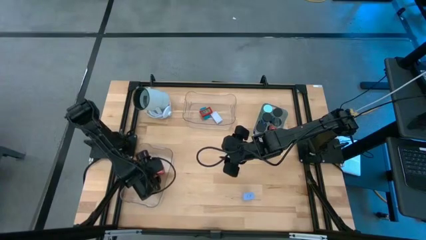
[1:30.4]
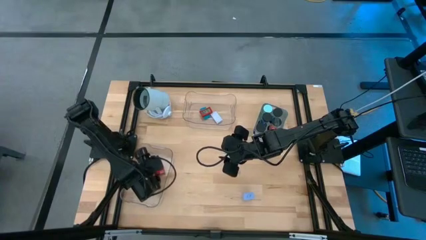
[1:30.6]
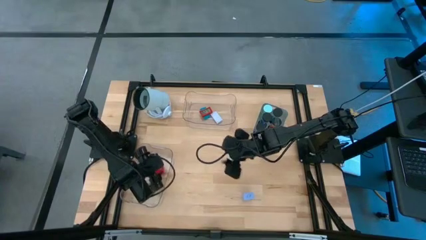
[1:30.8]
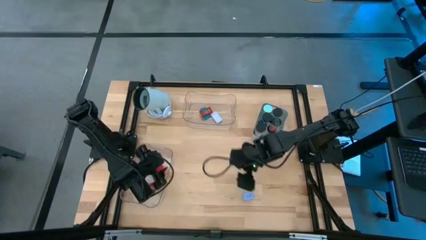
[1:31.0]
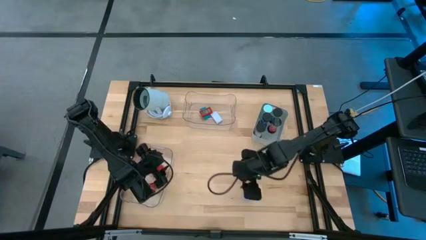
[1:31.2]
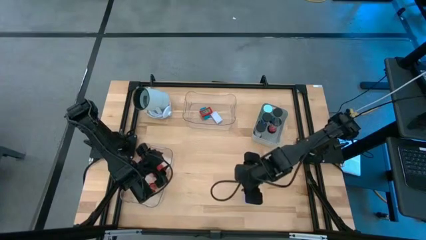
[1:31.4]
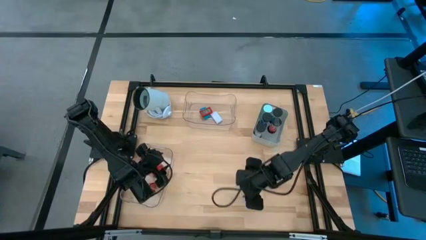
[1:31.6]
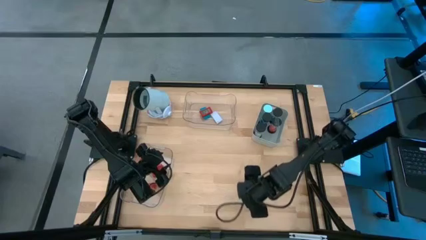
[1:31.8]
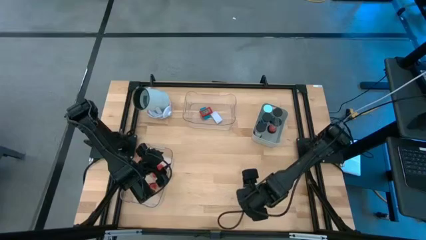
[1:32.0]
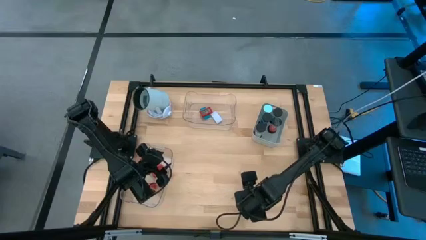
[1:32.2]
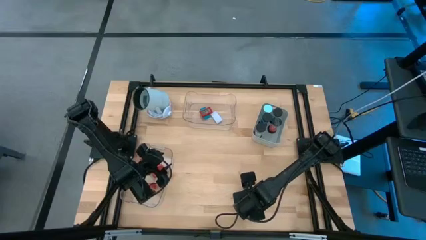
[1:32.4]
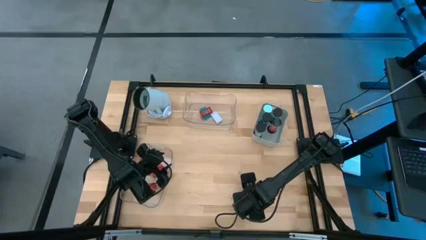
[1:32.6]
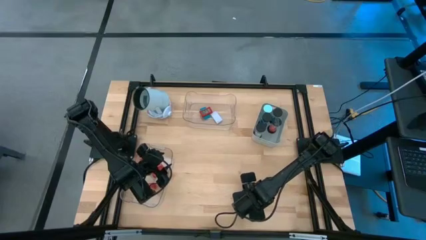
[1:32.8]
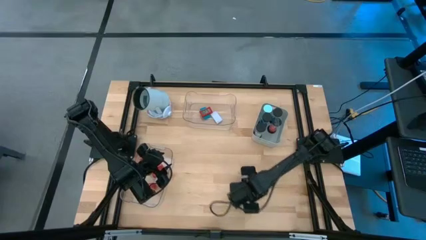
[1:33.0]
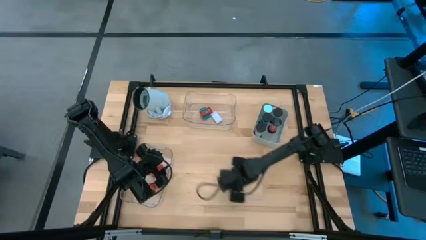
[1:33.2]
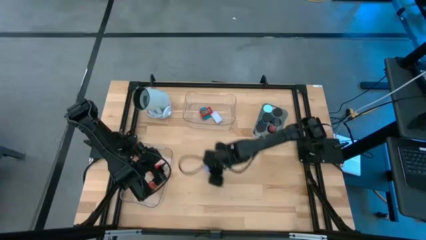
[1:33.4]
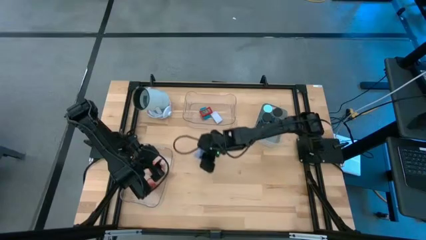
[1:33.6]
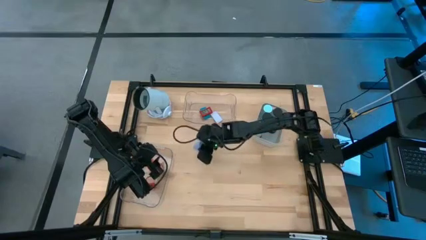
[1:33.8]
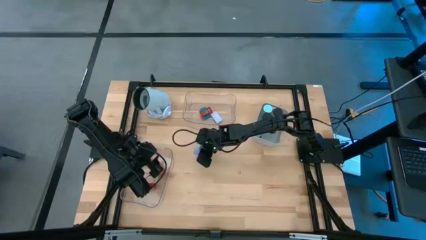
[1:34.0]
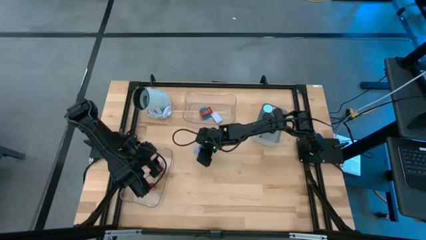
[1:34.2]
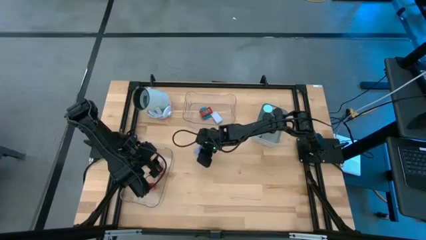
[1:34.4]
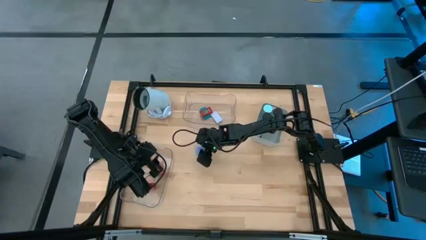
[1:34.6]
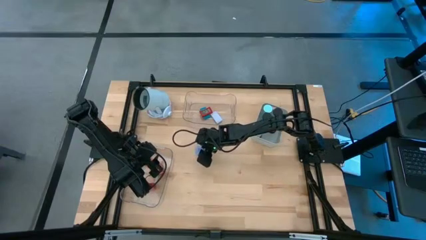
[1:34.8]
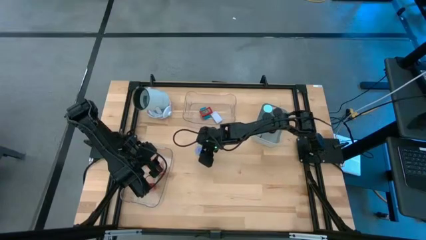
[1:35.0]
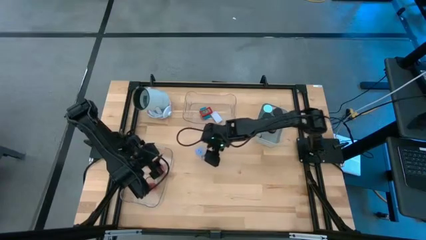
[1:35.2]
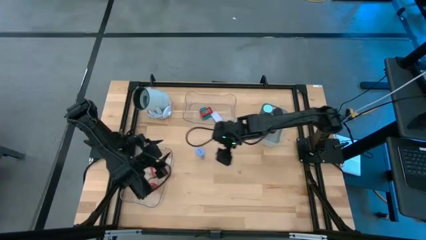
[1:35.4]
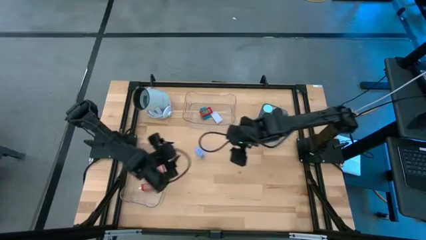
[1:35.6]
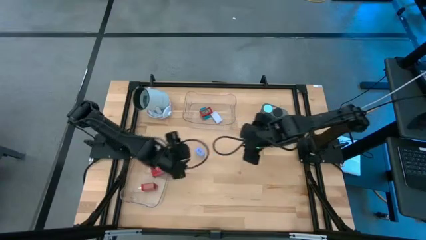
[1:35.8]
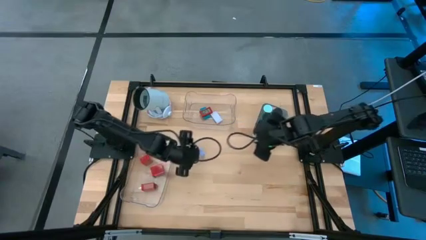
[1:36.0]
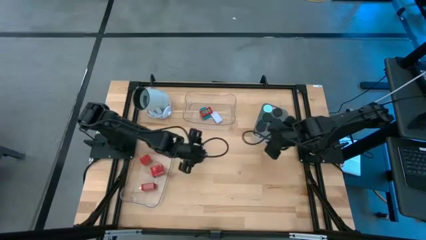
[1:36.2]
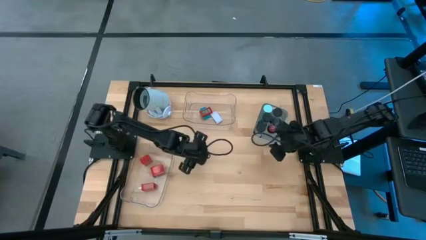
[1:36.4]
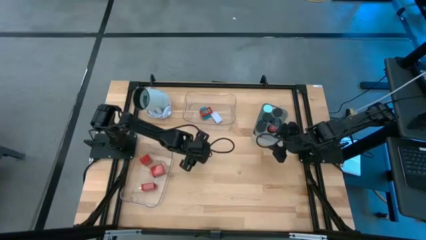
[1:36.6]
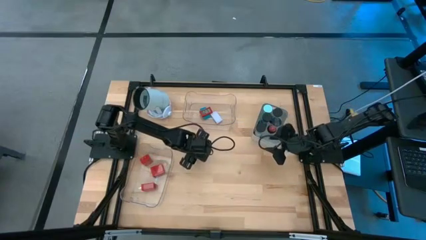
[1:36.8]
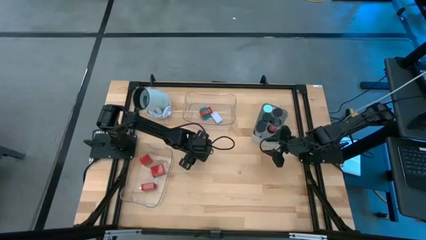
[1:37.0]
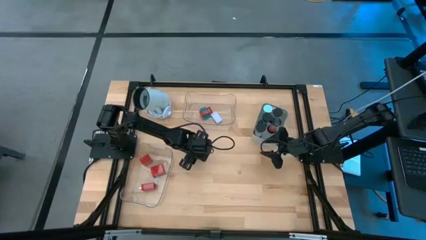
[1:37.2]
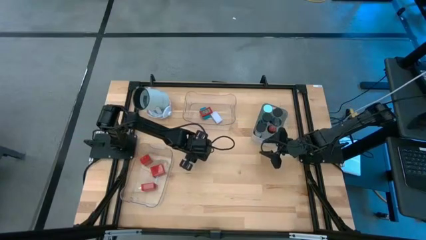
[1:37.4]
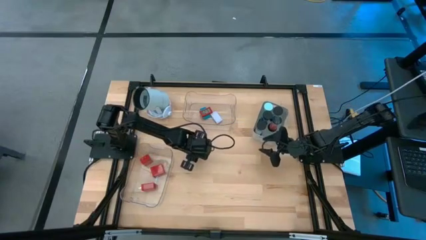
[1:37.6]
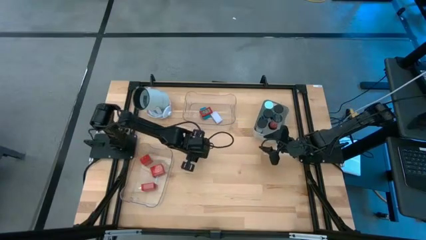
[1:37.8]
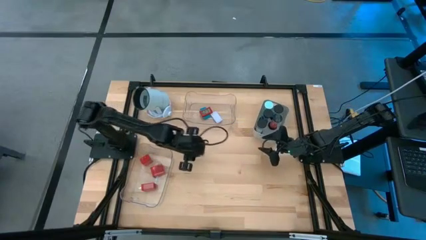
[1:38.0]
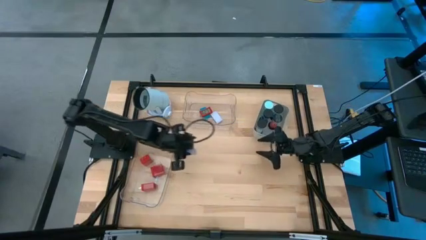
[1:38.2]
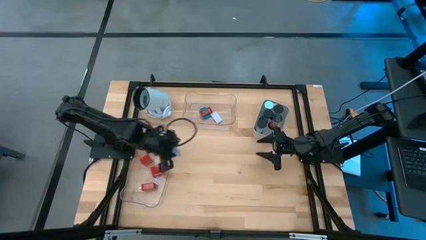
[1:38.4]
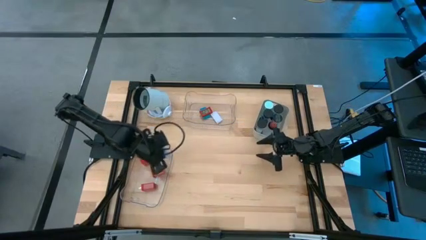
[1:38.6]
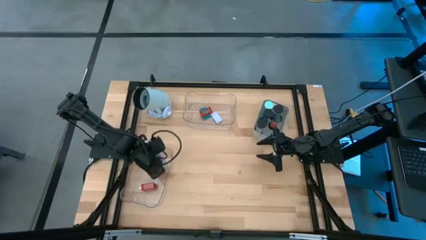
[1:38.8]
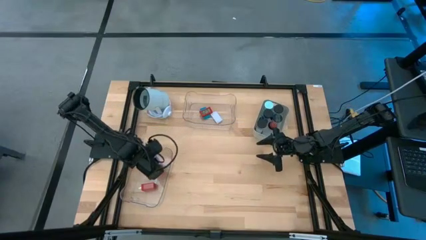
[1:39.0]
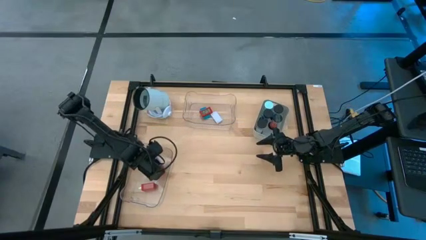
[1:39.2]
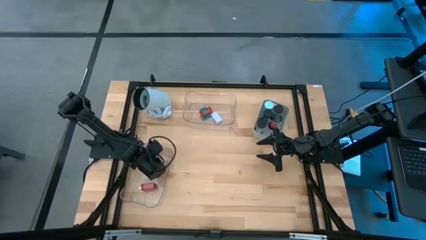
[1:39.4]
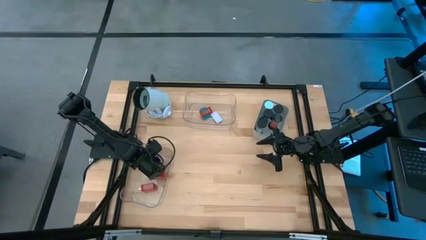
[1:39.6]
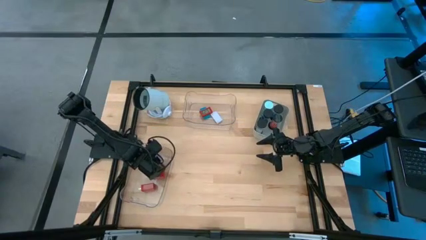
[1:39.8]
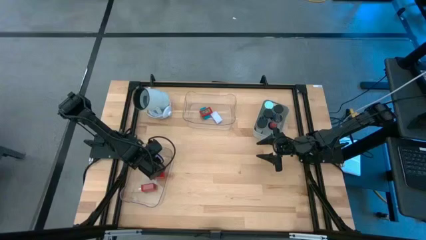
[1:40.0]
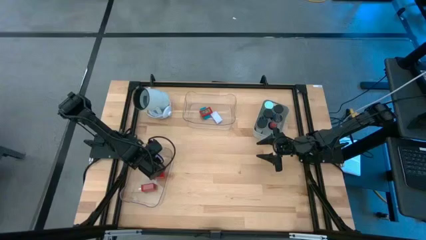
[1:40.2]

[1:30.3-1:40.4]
Task: Pick & Place Office items
Put the blue USB adapter into the clear bin

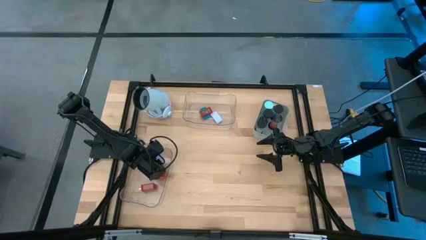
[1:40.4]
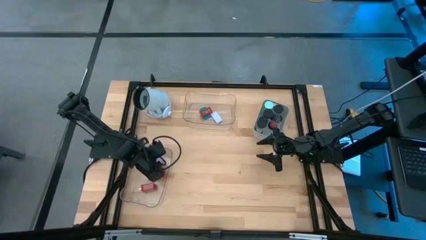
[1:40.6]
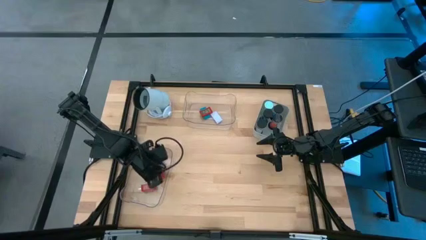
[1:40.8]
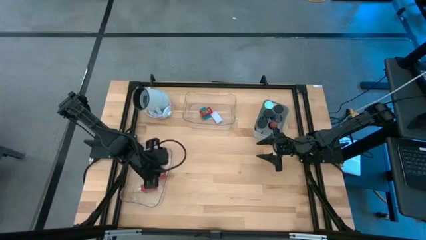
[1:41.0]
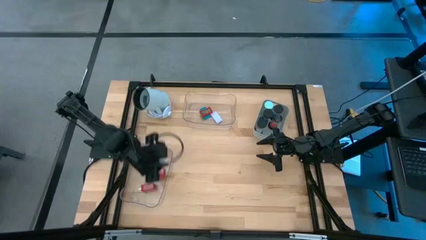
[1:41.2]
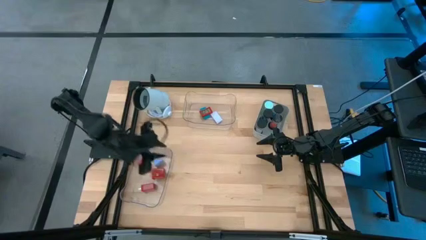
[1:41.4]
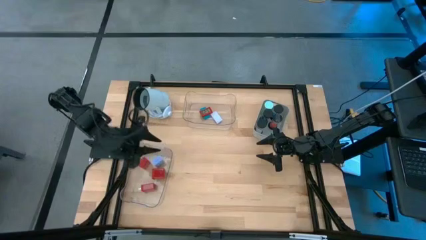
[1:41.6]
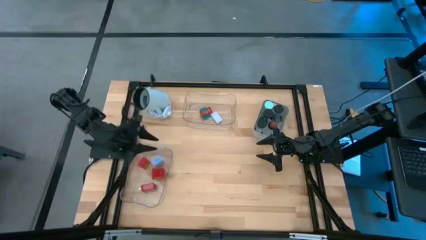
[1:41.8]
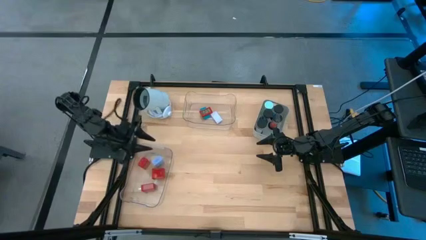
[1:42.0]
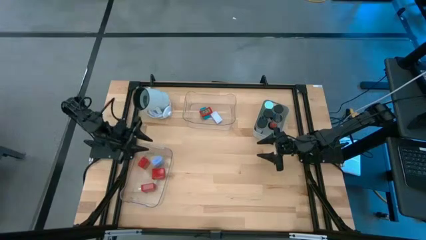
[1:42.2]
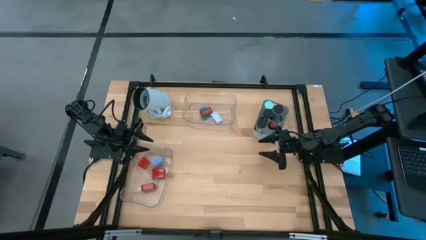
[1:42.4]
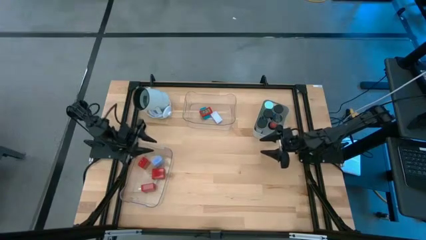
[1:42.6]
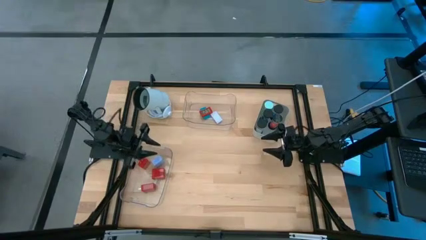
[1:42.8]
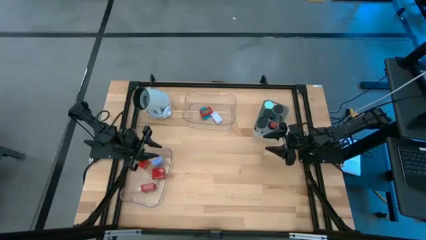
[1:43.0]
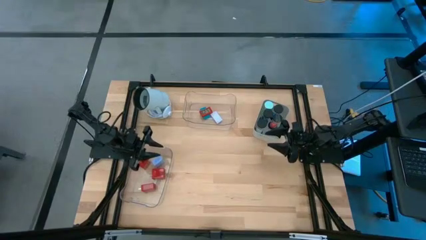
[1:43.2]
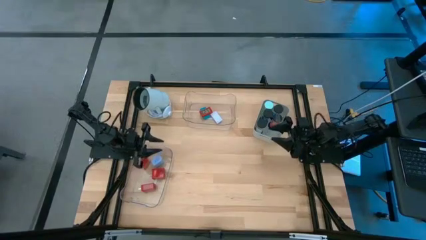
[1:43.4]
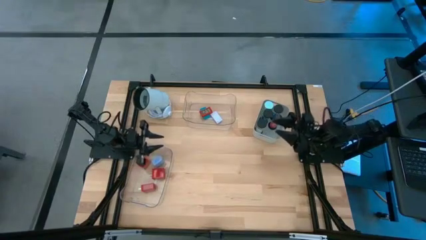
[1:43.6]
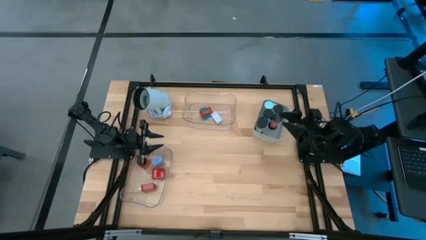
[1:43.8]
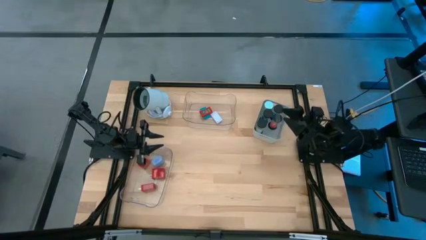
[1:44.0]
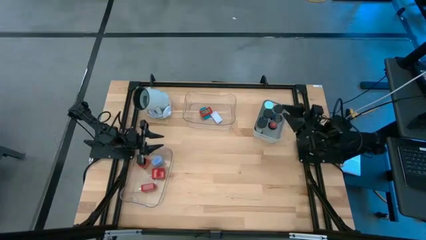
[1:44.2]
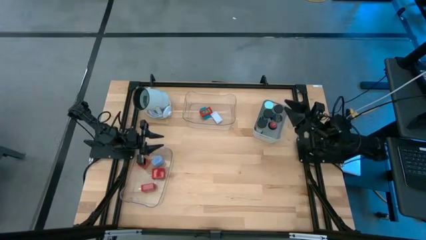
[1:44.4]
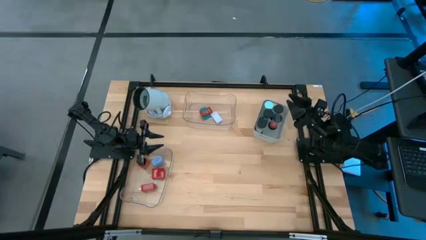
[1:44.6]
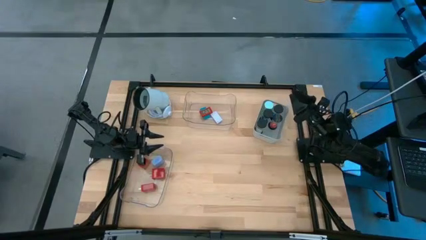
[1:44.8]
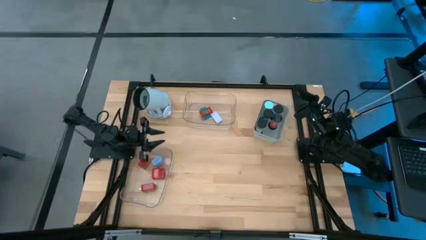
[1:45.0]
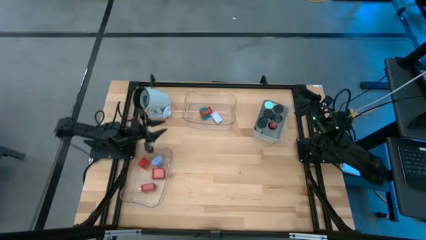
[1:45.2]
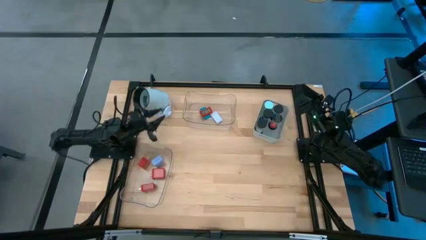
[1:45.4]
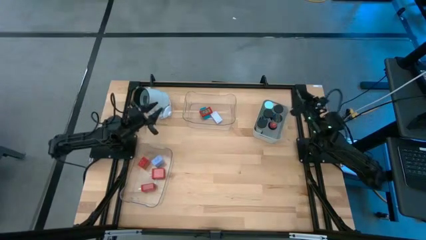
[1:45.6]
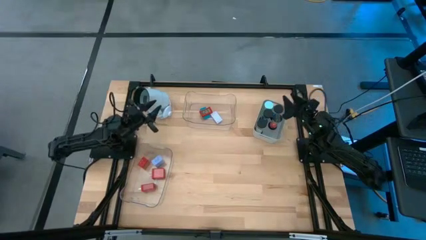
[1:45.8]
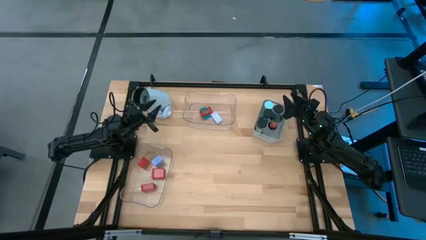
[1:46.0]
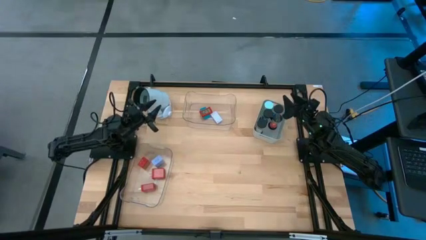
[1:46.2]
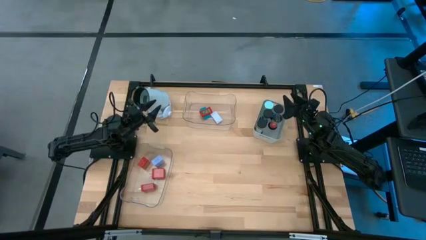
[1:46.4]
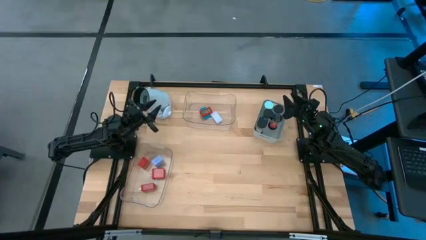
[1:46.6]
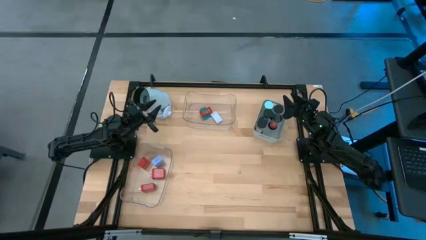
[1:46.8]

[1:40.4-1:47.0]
Return to home position
